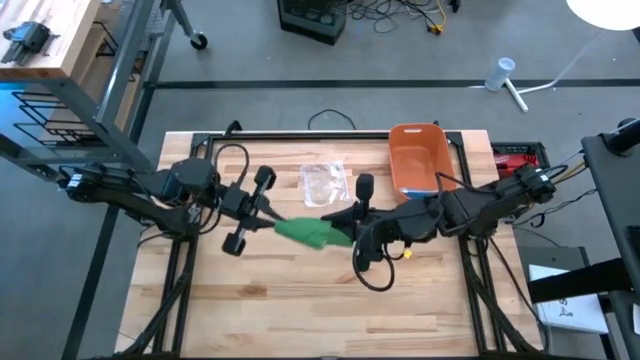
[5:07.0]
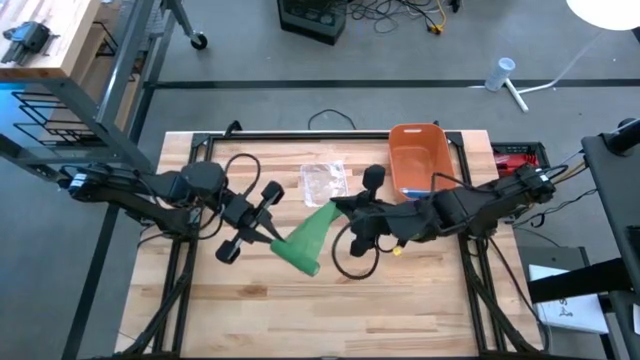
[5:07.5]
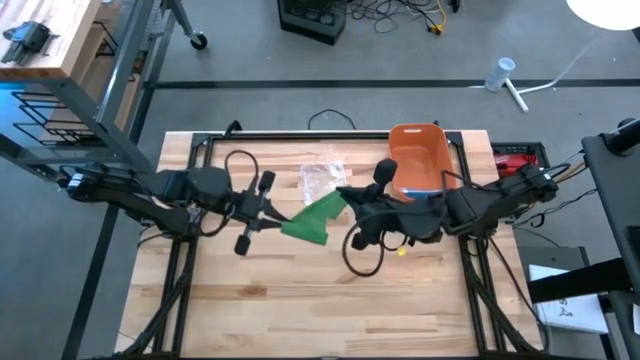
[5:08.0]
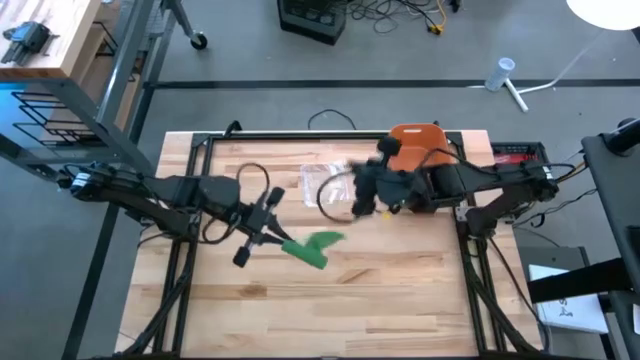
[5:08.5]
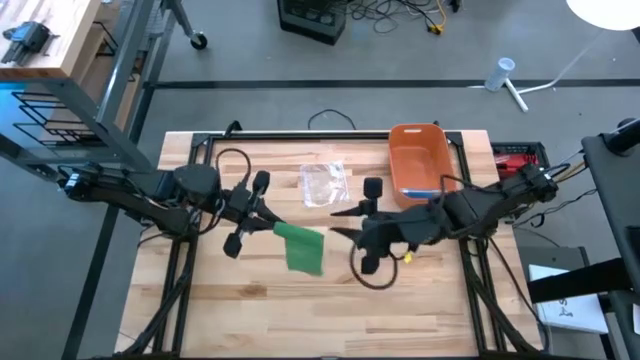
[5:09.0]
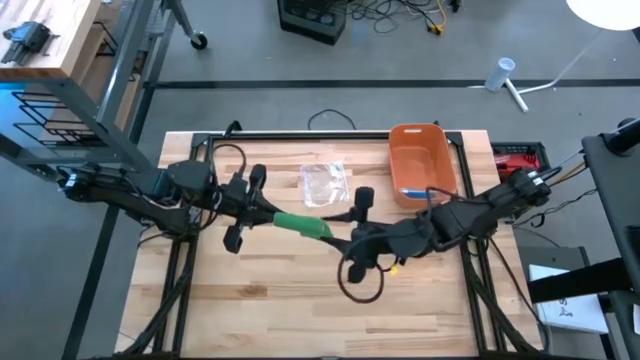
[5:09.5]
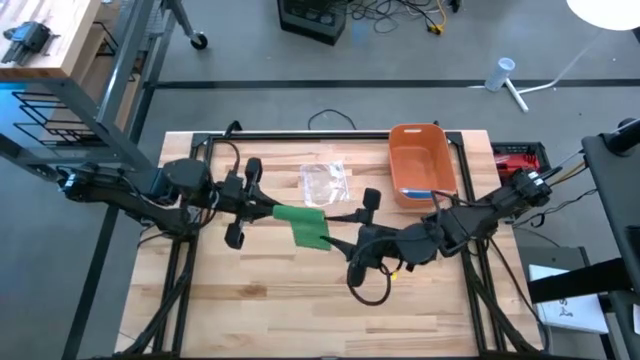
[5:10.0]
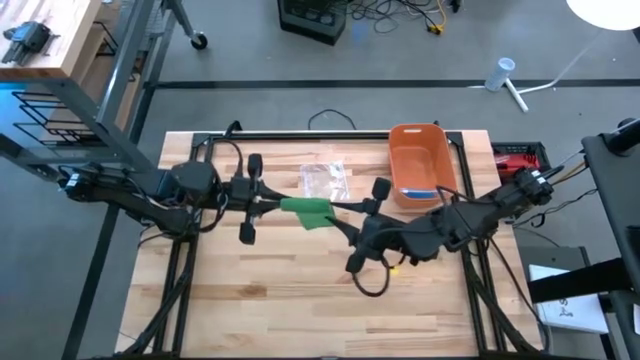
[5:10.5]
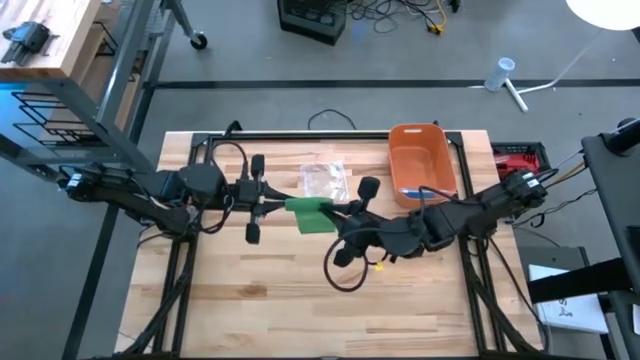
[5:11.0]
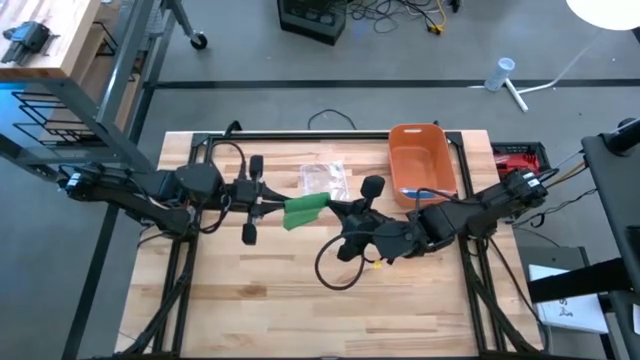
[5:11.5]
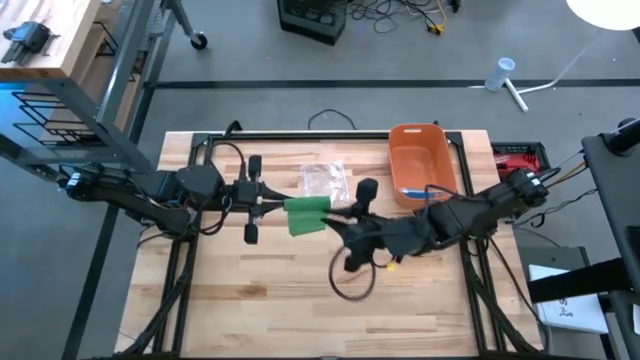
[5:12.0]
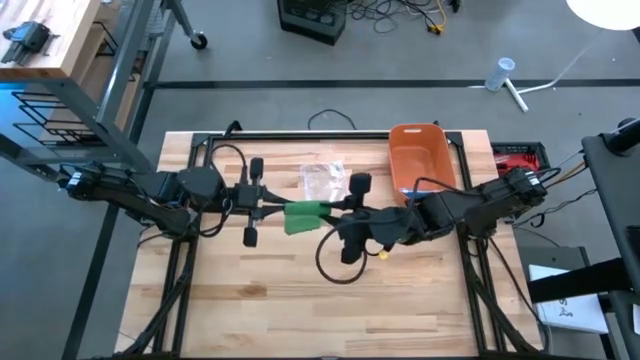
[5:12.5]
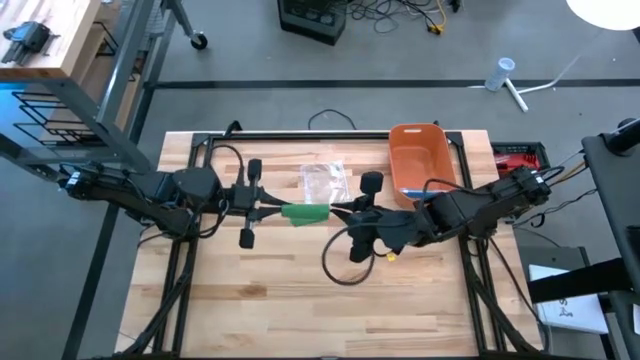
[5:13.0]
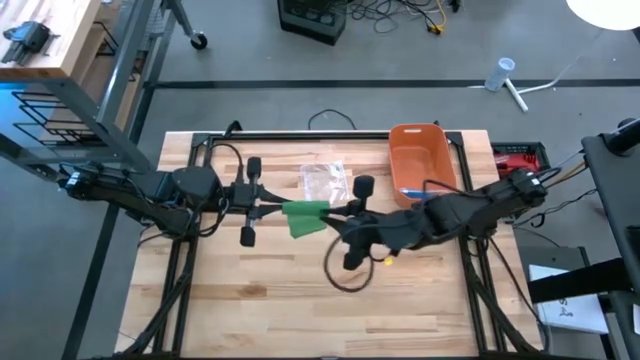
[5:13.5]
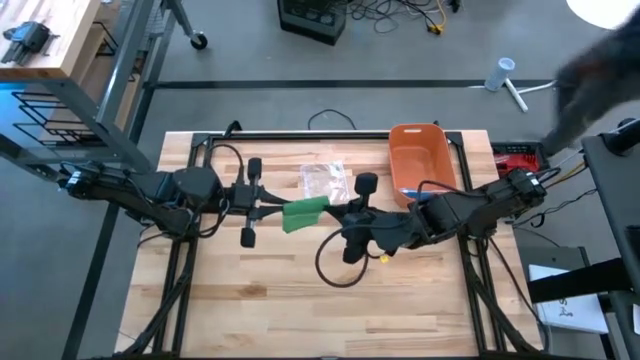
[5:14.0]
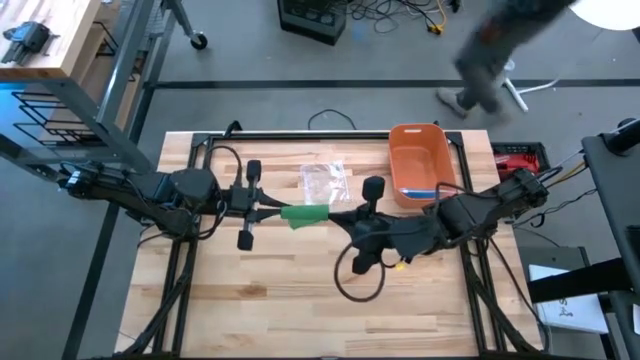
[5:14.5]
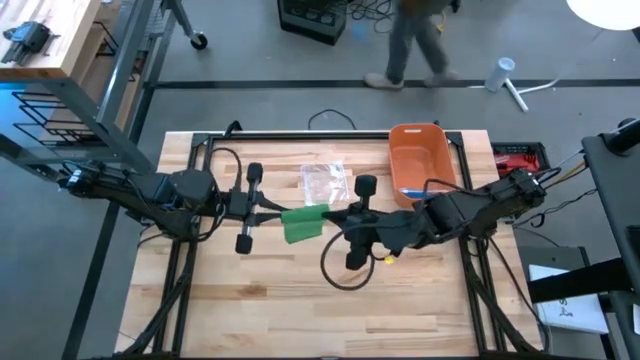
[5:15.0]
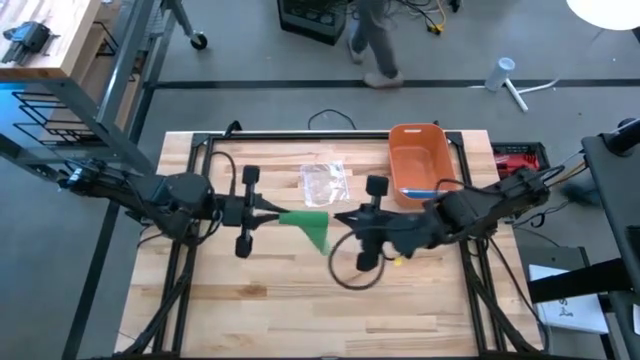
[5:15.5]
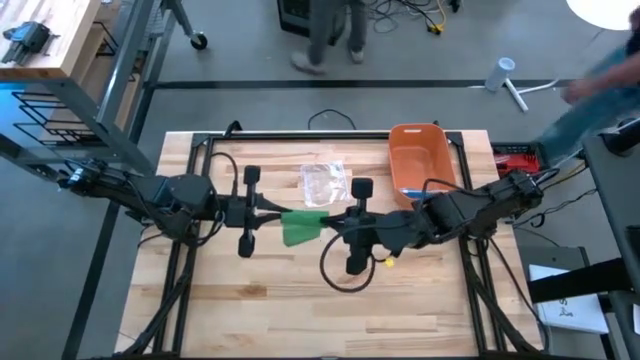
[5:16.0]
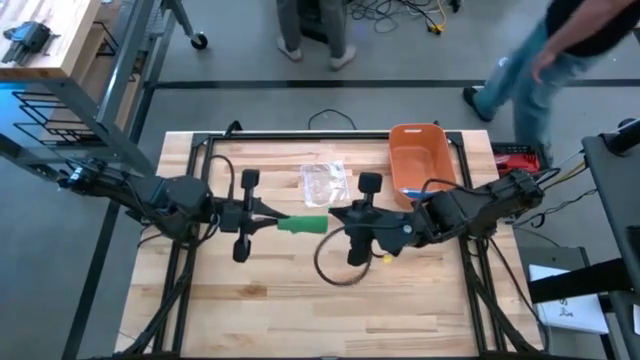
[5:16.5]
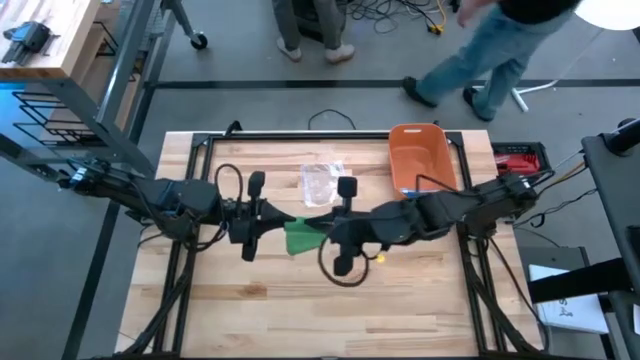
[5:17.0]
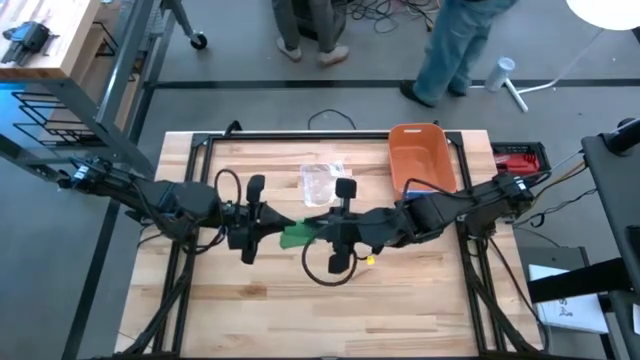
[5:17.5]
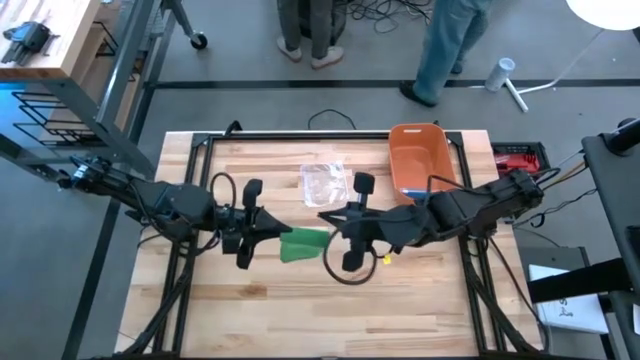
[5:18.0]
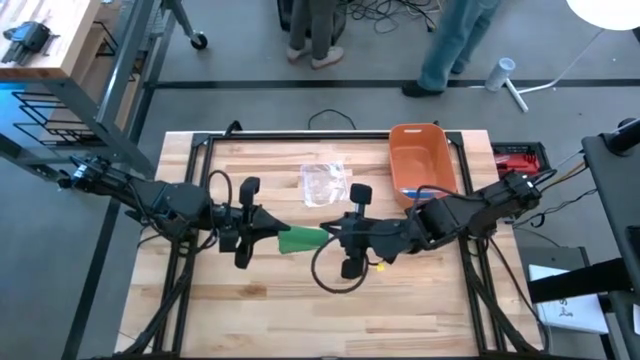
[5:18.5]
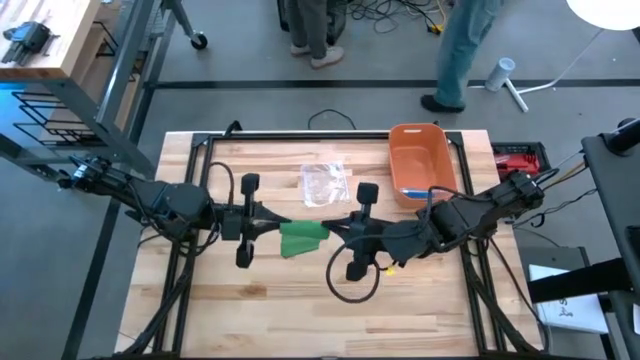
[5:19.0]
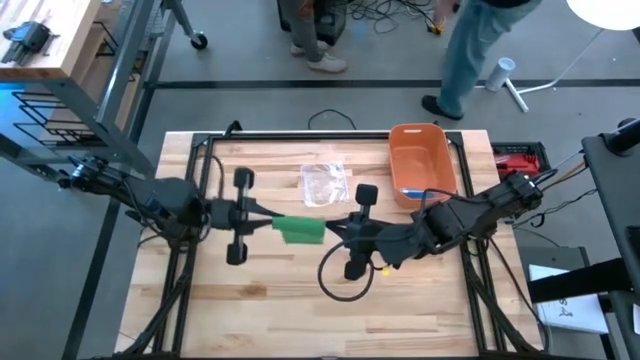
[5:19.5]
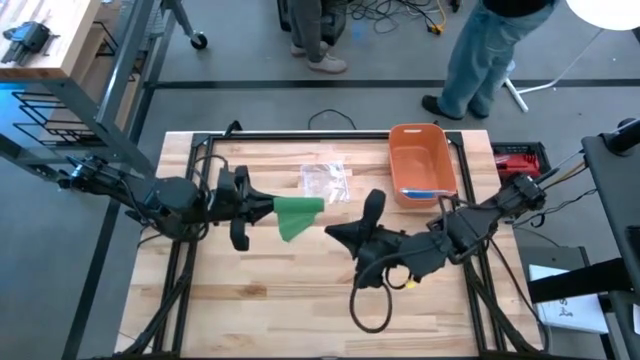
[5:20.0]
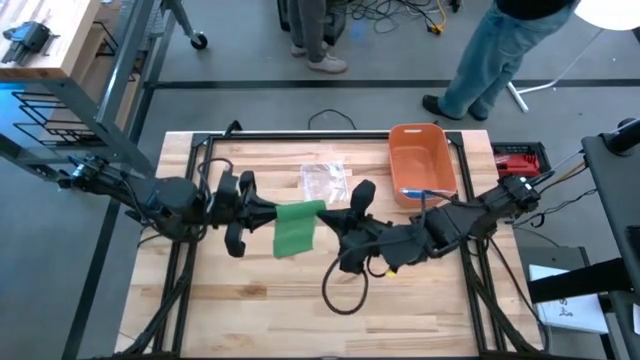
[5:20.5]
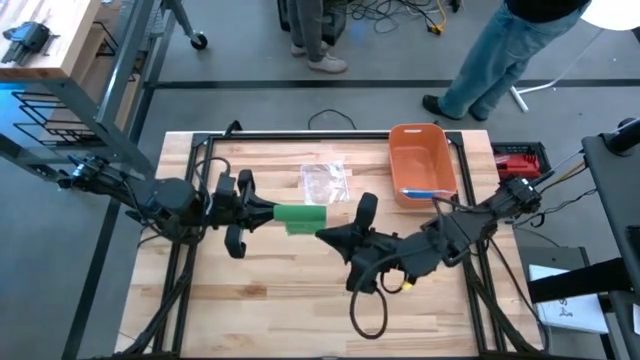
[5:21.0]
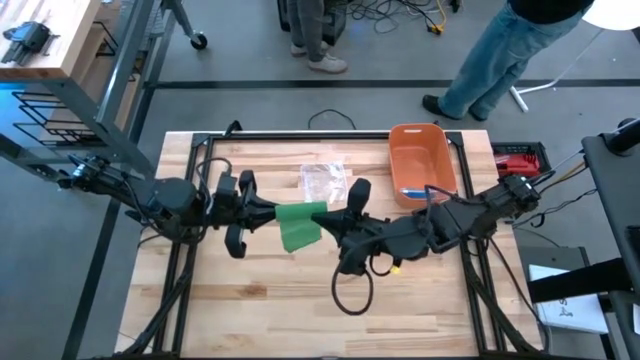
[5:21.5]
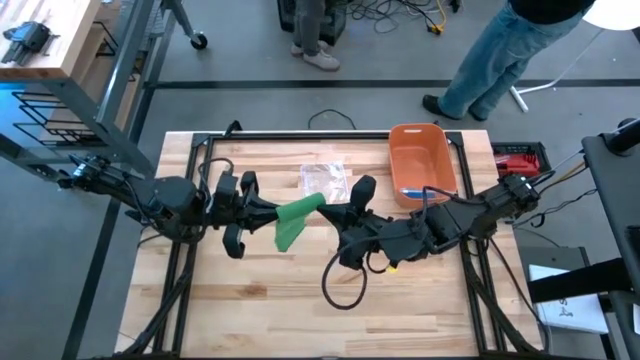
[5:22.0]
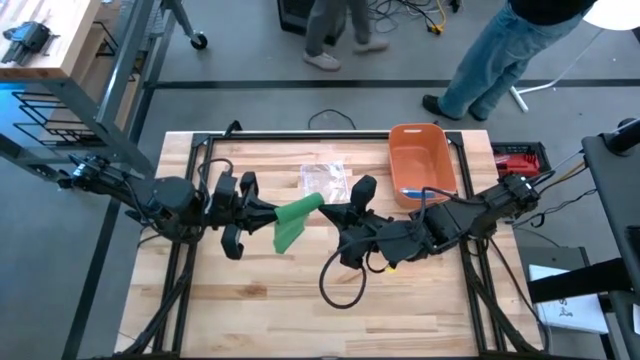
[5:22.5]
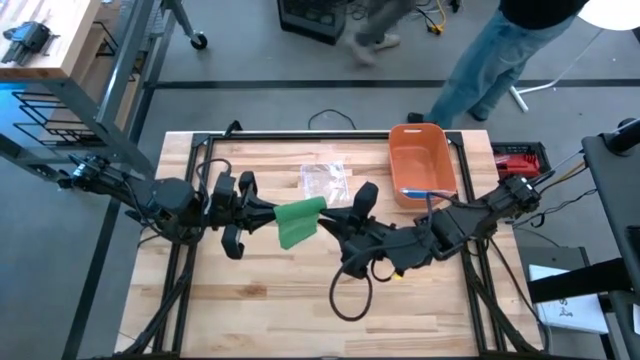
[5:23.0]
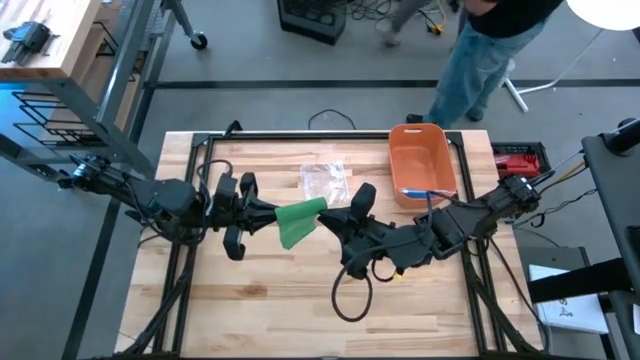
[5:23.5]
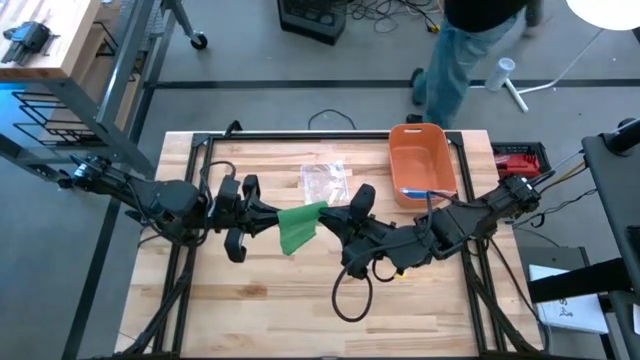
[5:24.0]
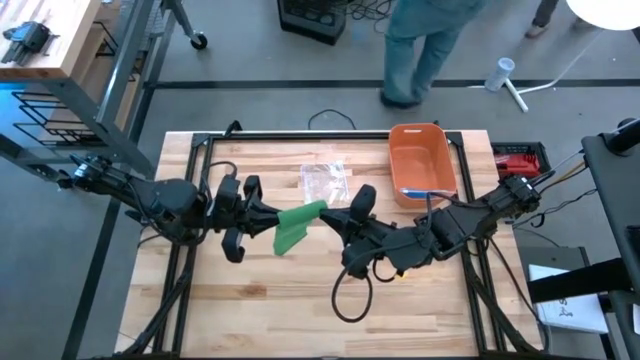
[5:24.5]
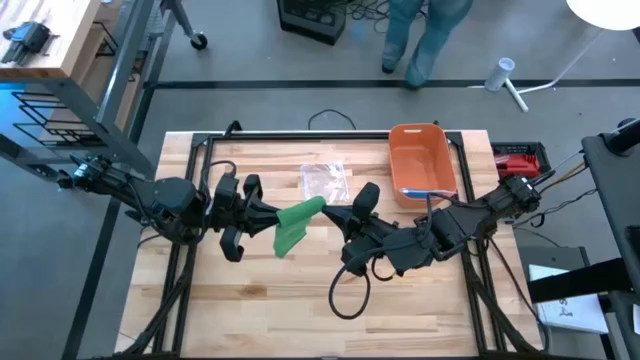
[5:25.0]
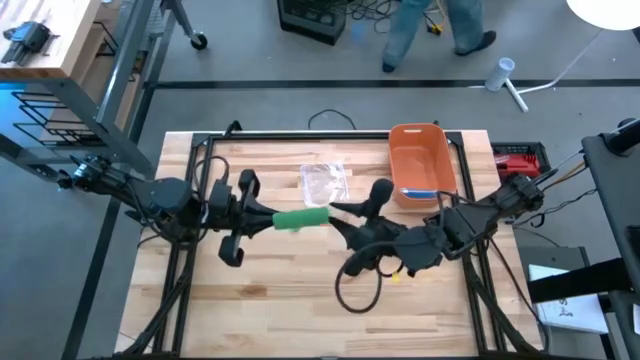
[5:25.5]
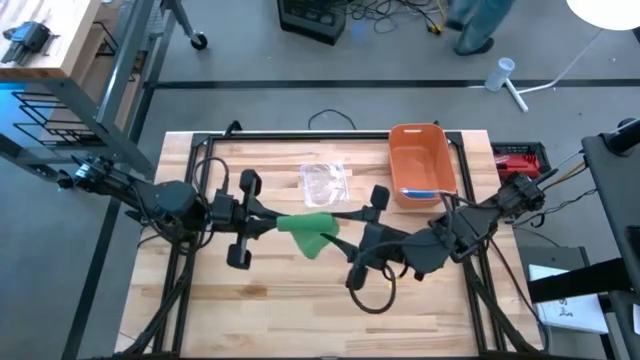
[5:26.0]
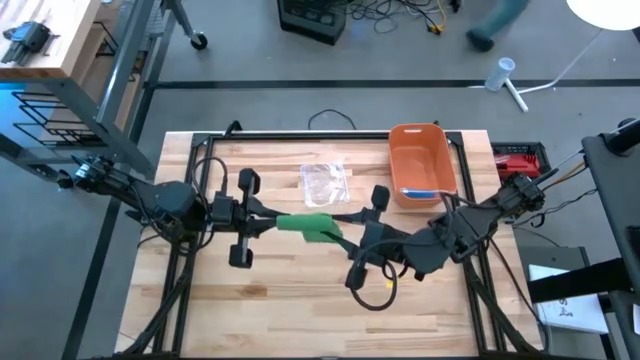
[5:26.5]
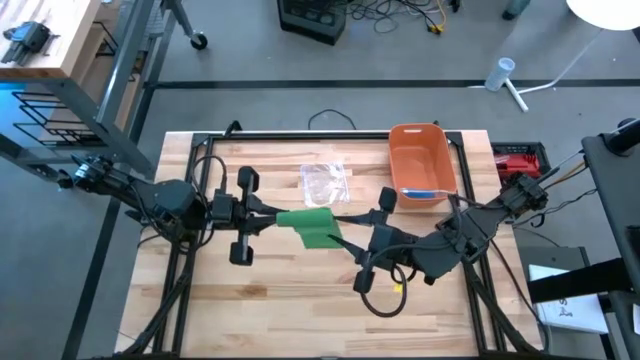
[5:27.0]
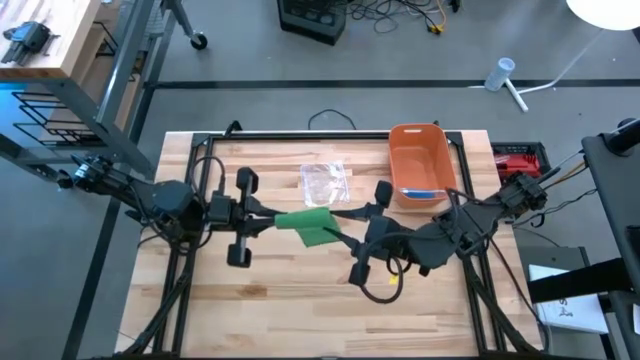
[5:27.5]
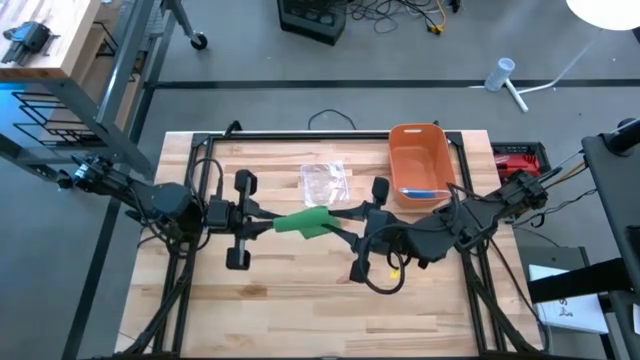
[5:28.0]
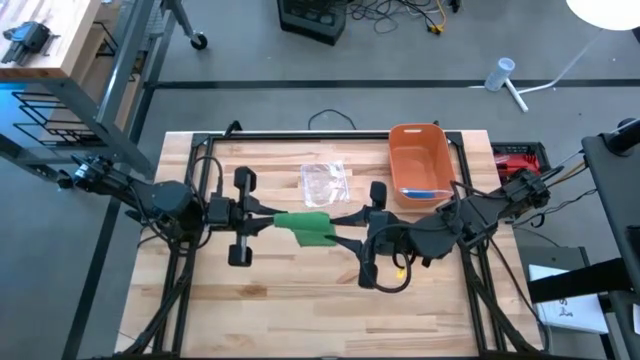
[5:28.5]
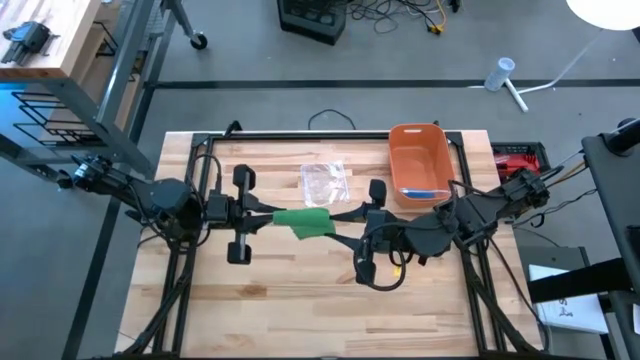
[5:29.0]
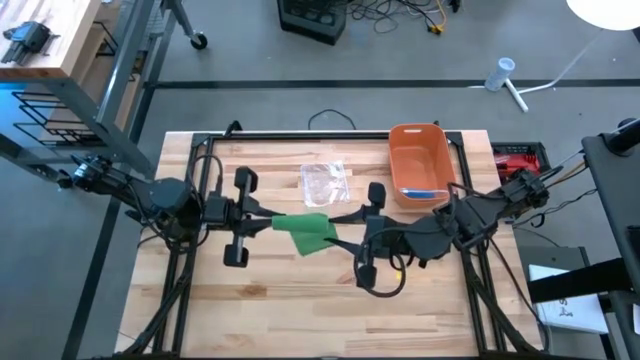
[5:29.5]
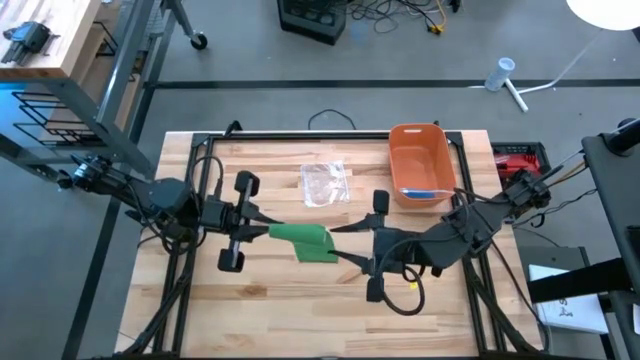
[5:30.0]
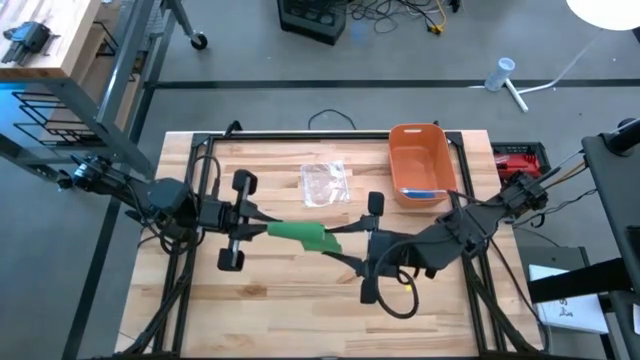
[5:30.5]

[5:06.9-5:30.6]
Task: Roll bandage
Roll the green bandage
